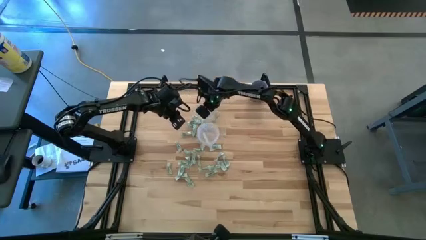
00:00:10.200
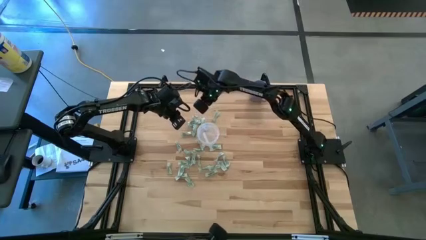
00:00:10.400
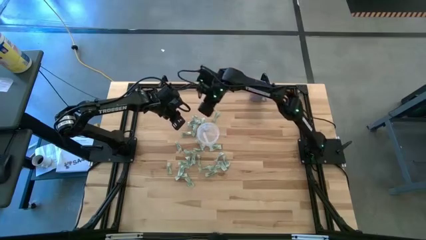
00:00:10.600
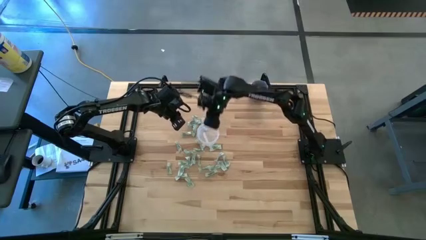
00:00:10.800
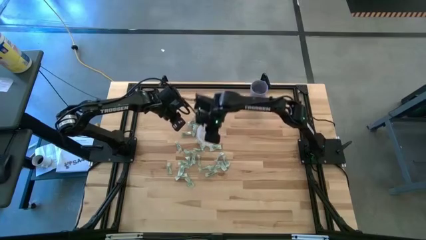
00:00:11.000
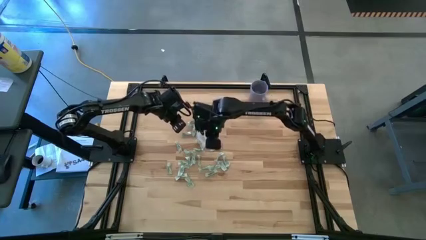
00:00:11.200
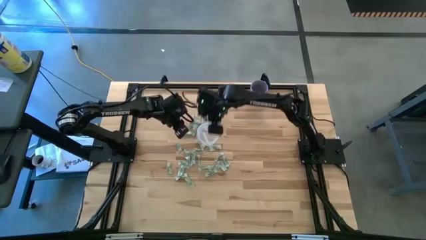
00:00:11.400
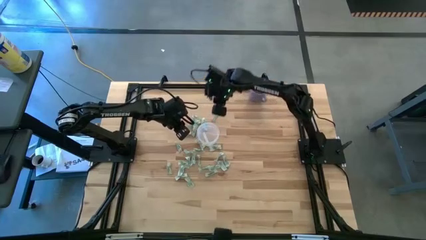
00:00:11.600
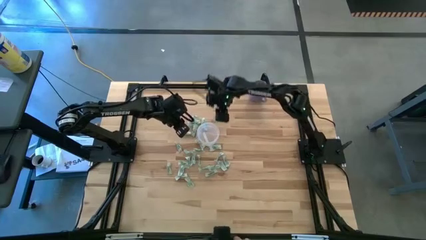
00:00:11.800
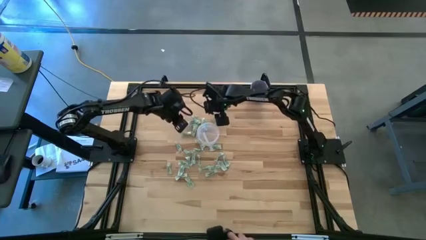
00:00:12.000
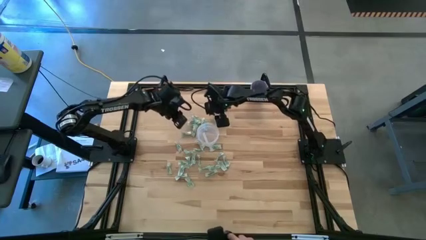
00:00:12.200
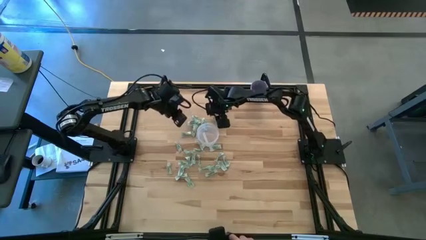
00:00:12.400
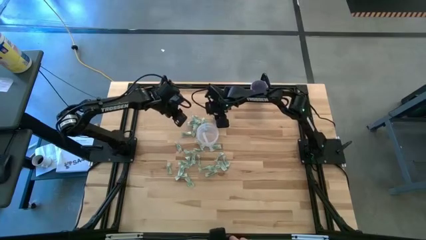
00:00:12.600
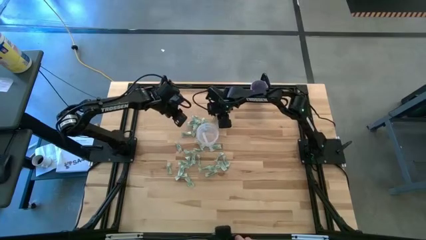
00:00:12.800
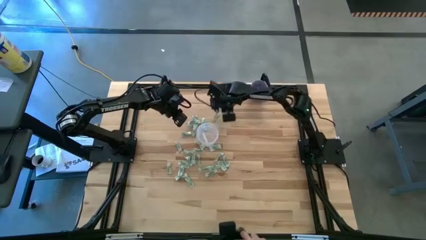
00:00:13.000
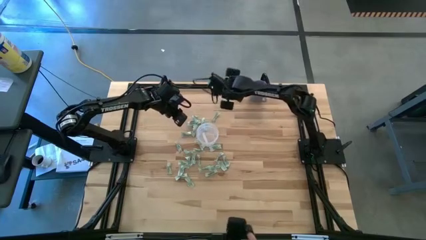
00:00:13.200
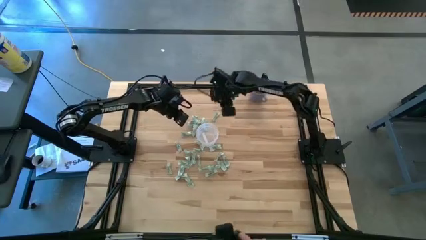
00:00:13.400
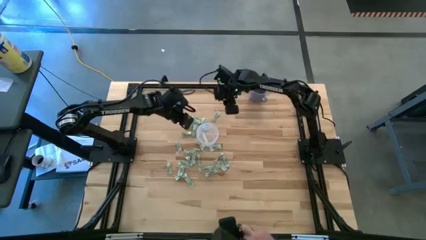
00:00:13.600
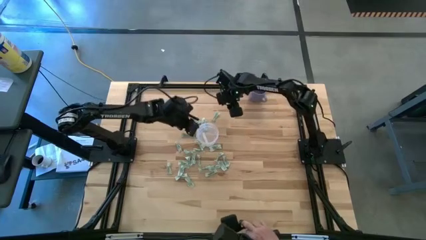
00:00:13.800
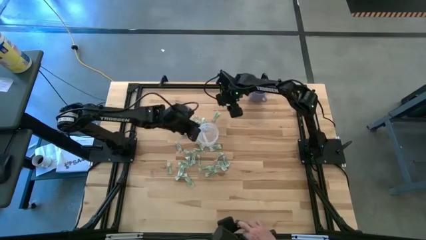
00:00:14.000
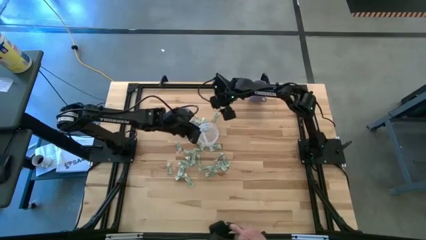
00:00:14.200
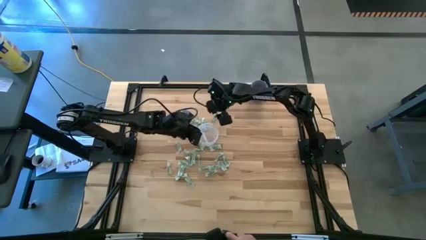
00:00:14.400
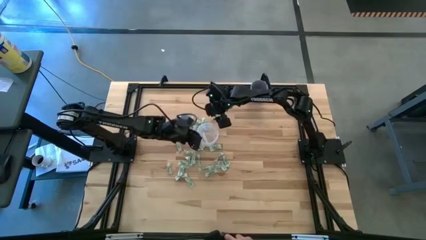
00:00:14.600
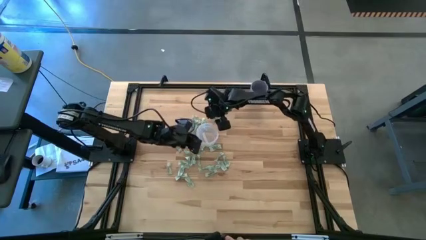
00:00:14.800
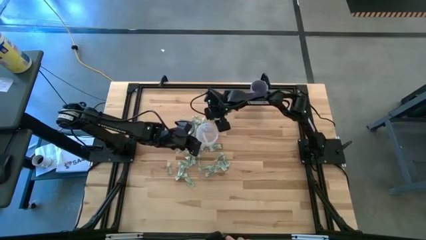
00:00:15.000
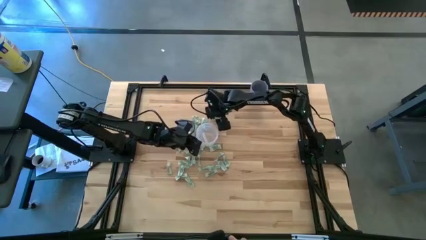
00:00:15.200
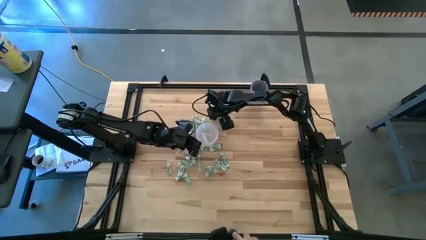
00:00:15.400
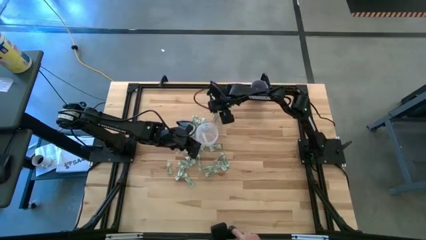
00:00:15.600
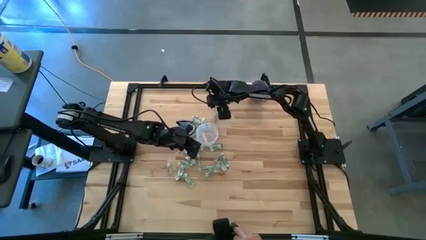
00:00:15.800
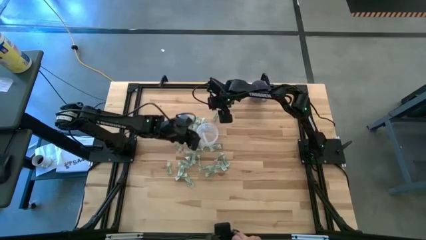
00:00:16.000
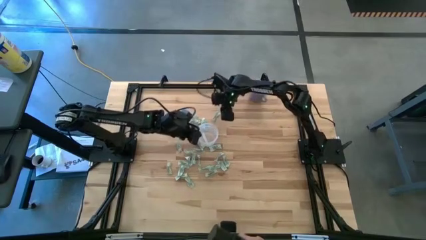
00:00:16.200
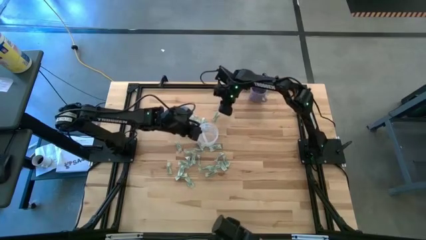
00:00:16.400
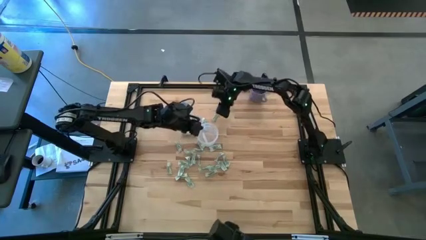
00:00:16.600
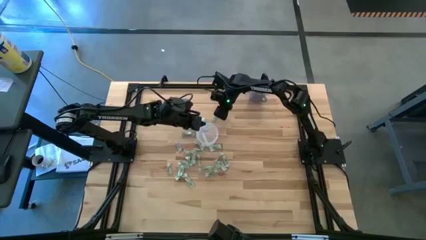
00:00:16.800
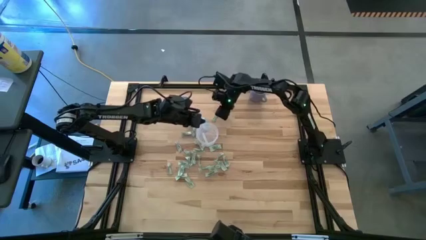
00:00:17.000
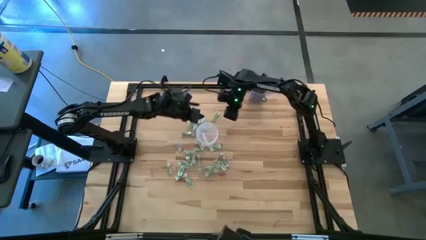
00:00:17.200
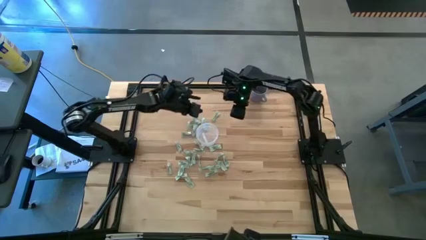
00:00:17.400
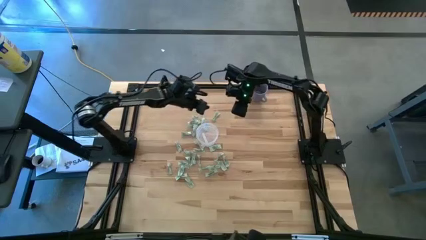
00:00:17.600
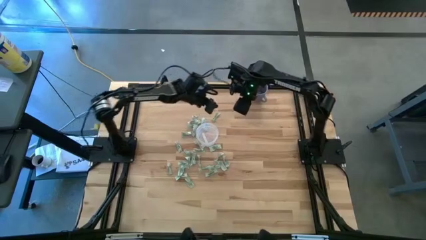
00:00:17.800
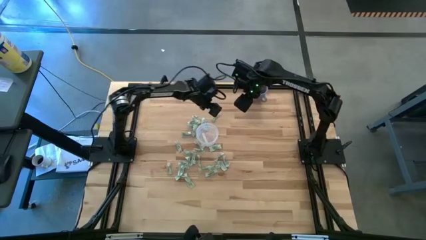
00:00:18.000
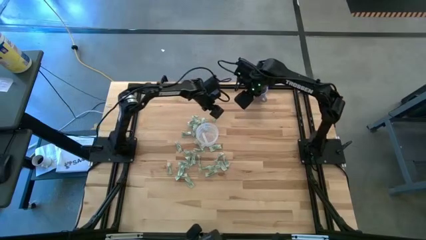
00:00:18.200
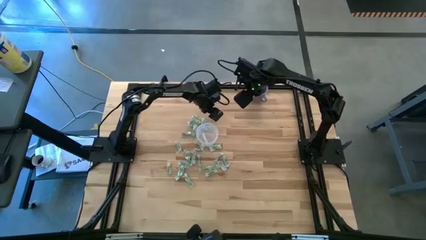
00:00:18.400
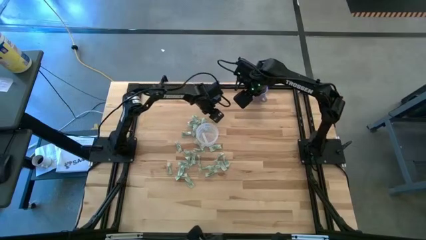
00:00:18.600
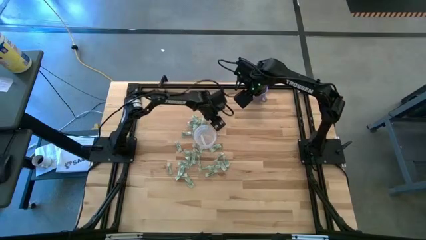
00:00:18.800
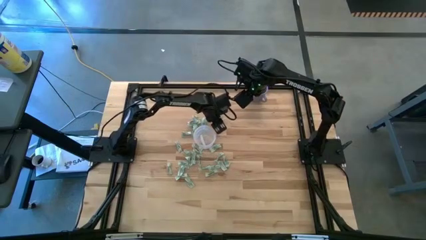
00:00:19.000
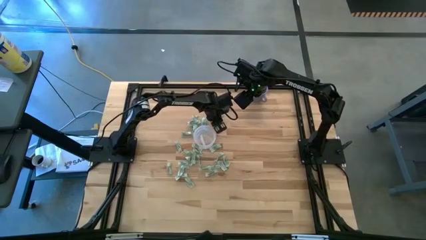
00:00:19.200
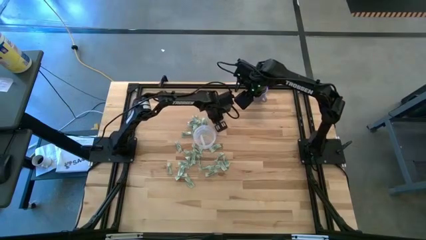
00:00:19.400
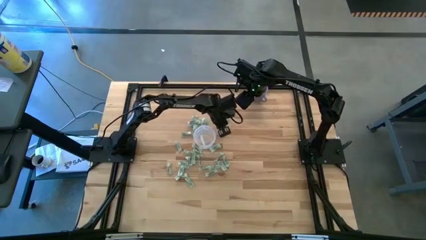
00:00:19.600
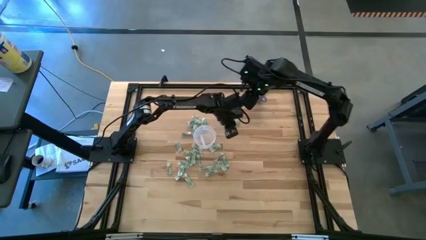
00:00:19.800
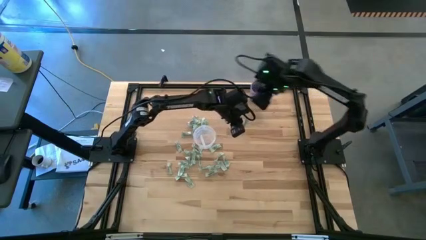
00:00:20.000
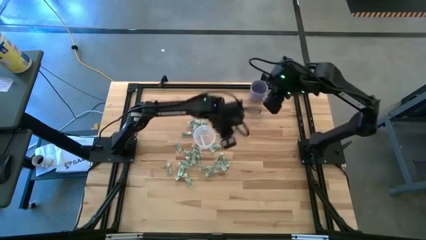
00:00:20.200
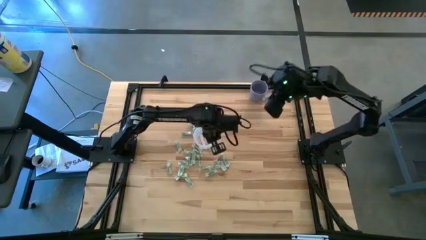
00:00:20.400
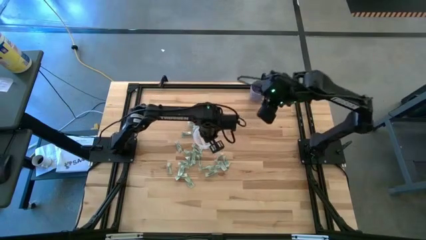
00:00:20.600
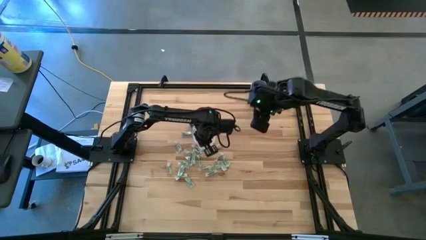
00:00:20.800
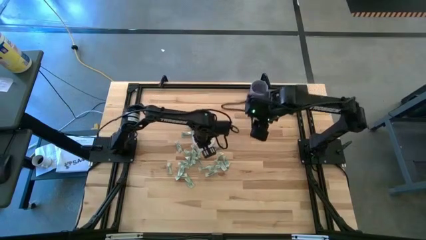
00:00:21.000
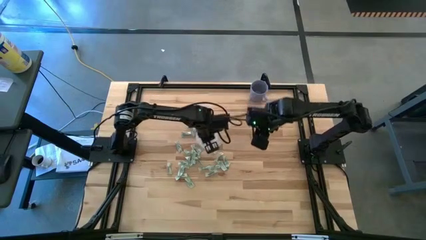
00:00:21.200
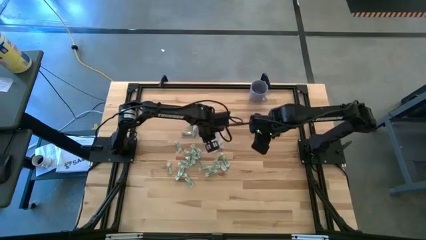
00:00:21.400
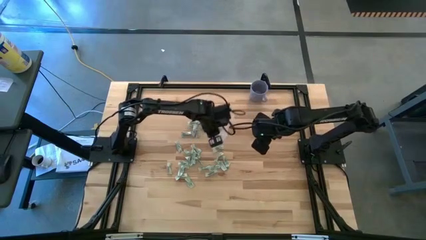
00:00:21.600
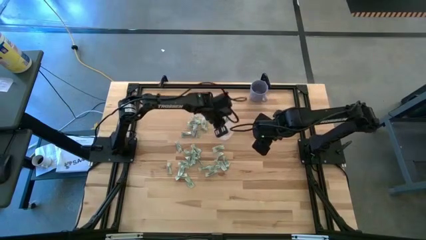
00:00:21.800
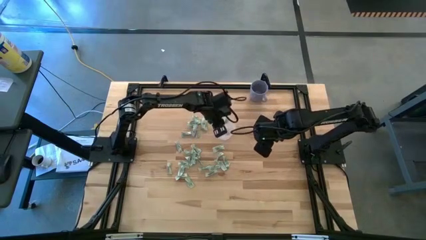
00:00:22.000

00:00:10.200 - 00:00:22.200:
Task: Pick and place Stevia / Truvia into bins
Put the stevia packet into the transparent container

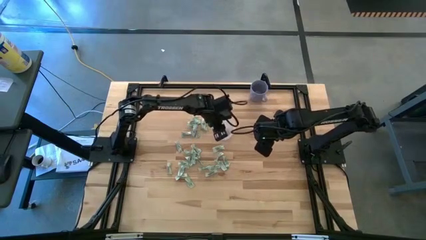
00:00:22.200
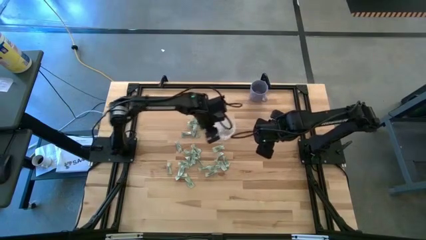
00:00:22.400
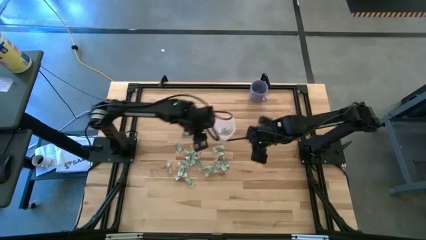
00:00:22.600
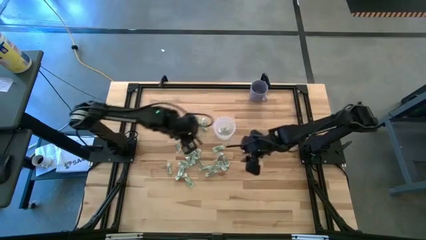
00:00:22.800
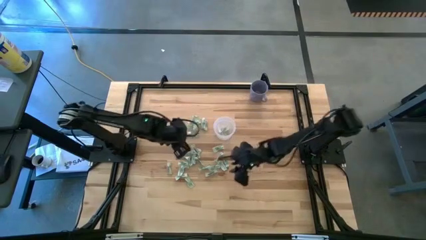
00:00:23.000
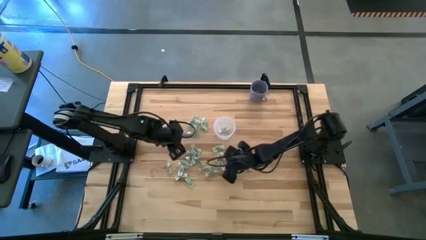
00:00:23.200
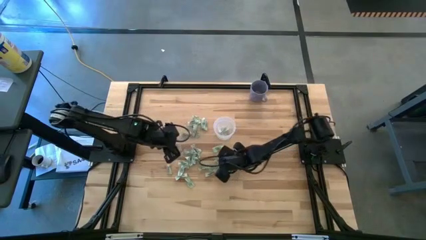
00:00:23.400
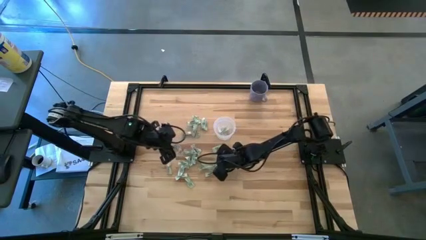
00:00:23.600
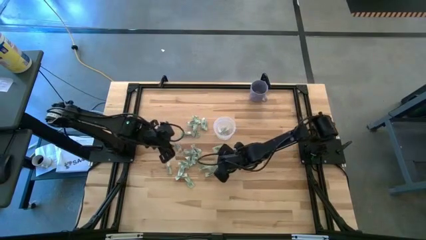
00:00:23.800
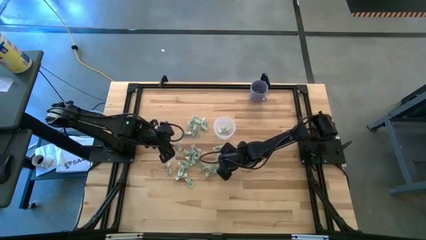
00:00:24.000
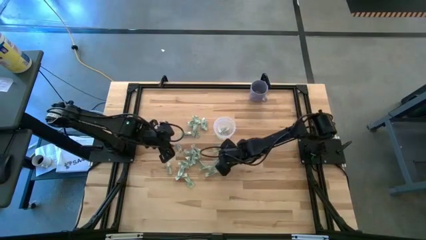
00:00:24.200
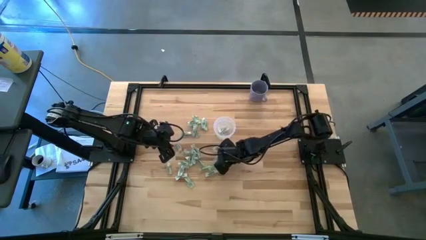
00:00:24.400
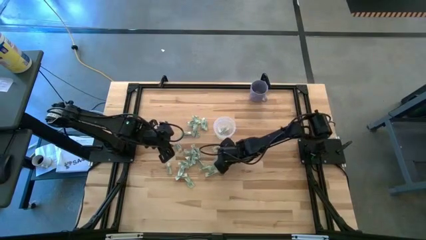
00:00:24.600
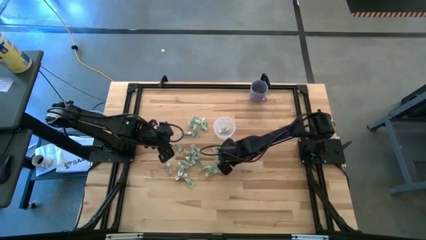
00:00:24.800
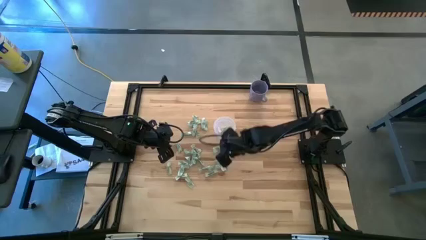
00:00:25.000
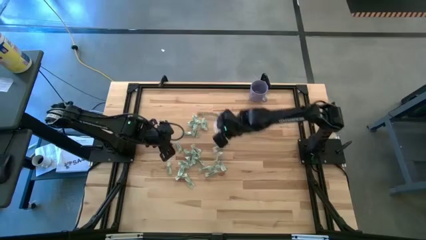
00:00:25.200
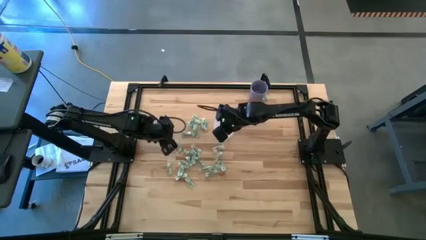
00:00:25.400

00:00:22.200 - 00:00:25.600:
Put the stevia packet into the transparent container

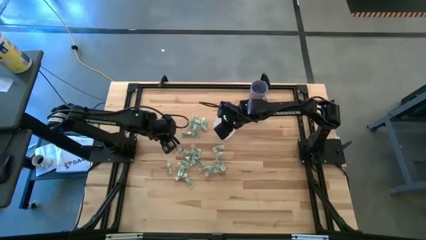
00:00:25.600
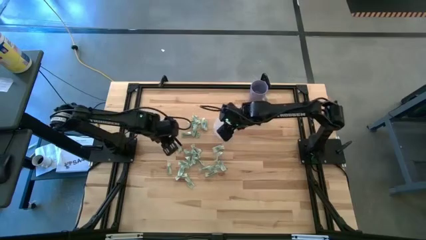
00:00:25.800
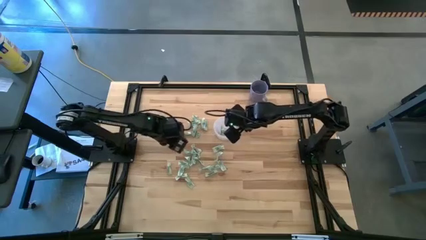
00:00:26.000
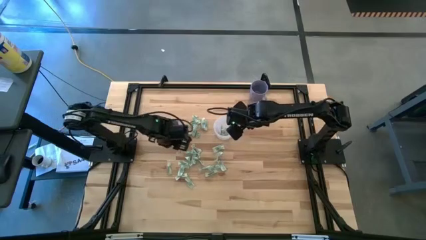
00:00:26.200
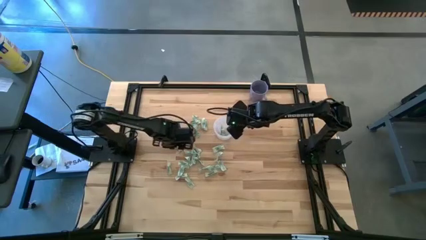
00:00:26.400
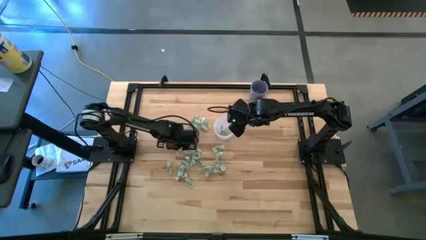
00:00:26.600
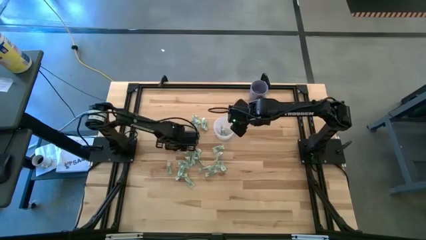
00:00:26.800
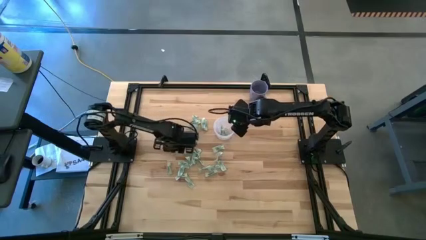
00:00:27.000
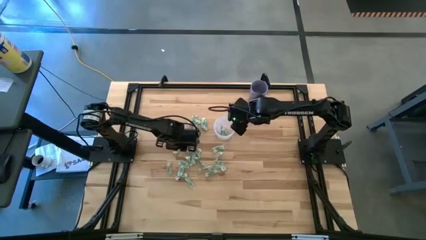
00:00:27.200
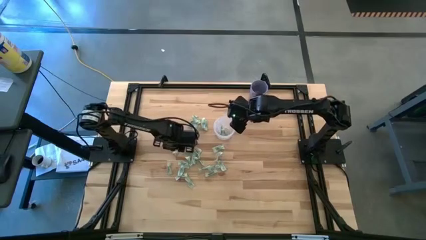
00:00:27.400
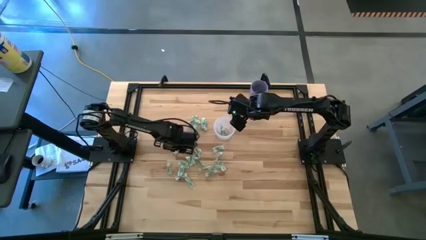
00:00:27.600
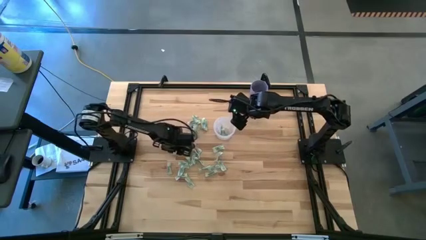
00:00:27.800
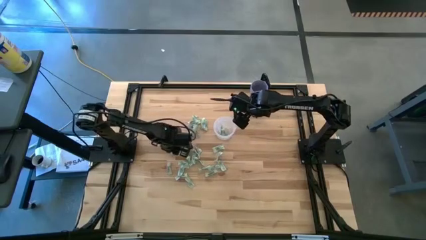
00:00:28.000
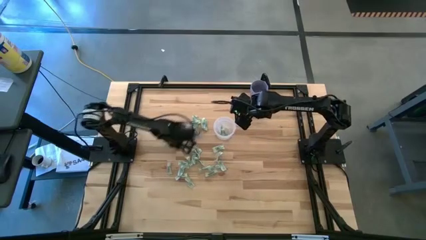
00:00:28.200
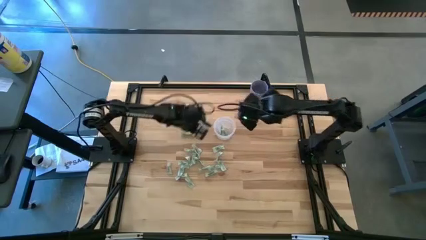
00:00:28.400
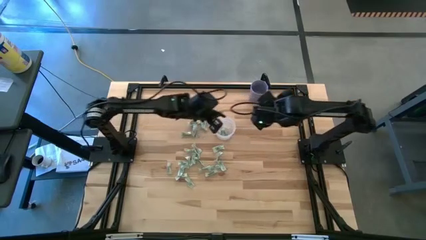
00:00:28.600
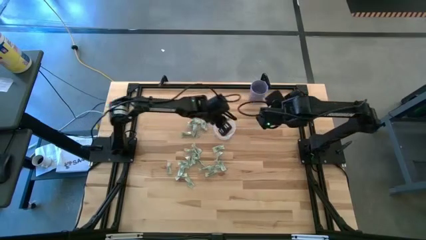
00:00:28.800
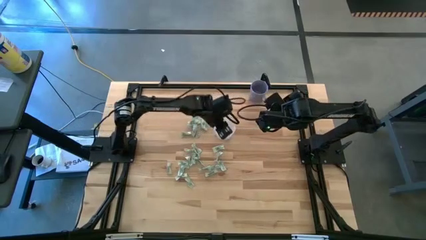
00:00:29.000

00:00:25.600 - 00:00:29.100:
Put the stevia packet into the transparent container
